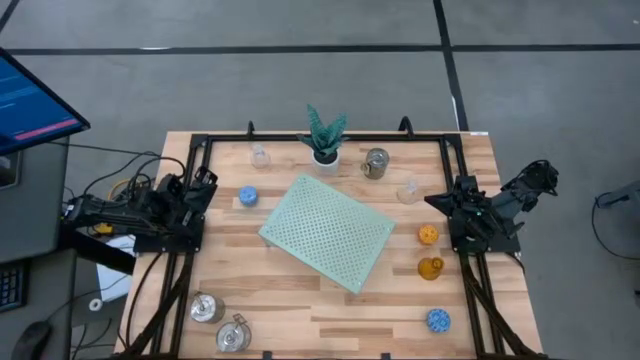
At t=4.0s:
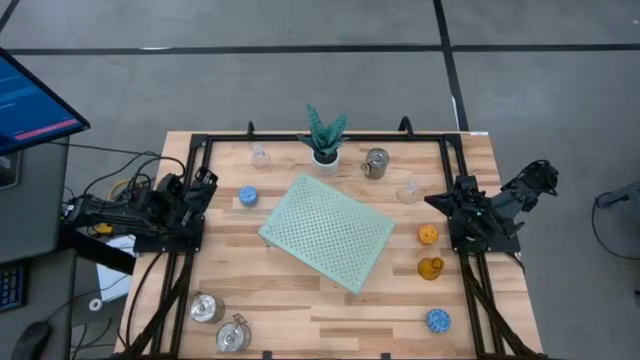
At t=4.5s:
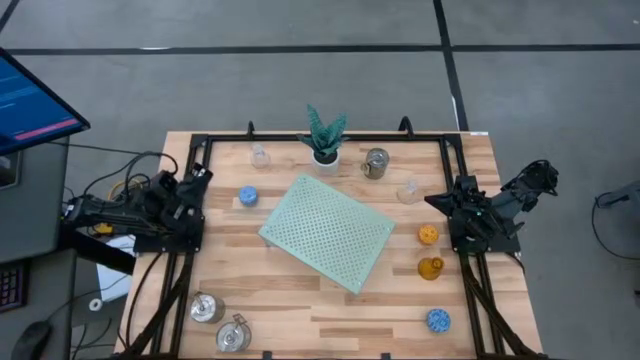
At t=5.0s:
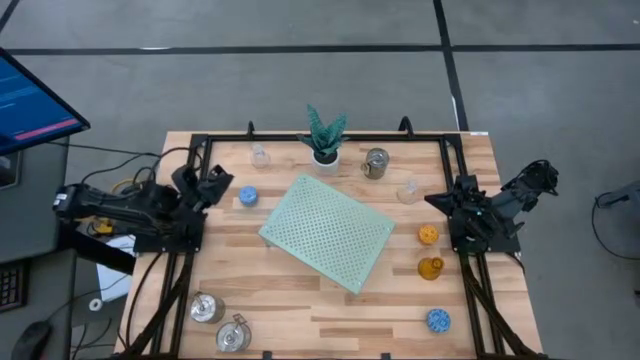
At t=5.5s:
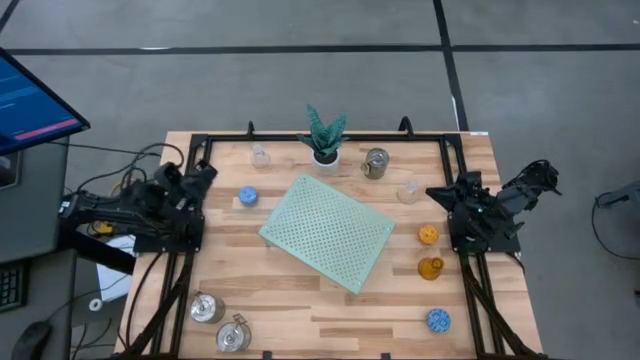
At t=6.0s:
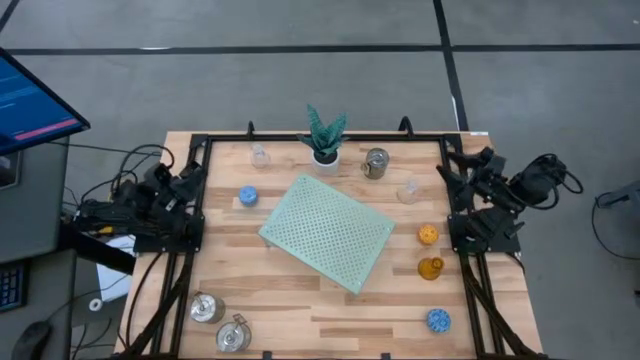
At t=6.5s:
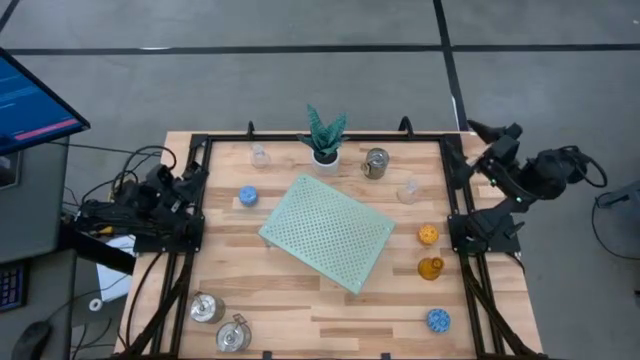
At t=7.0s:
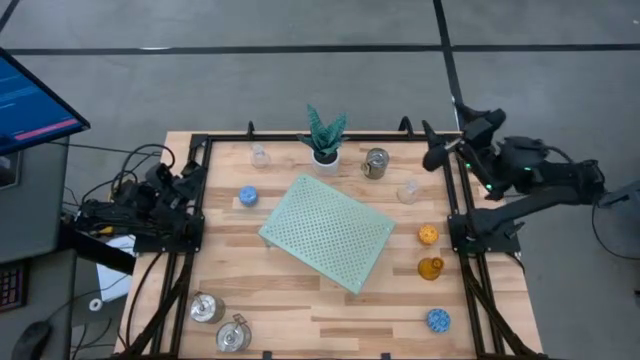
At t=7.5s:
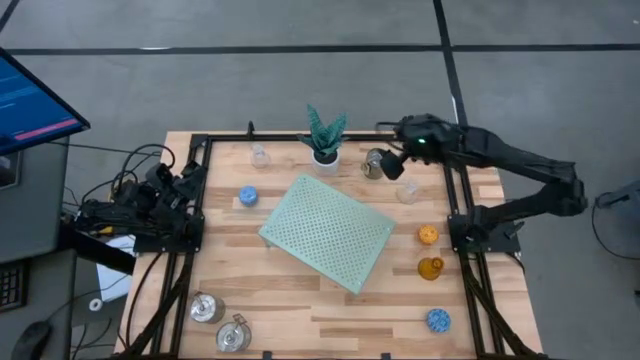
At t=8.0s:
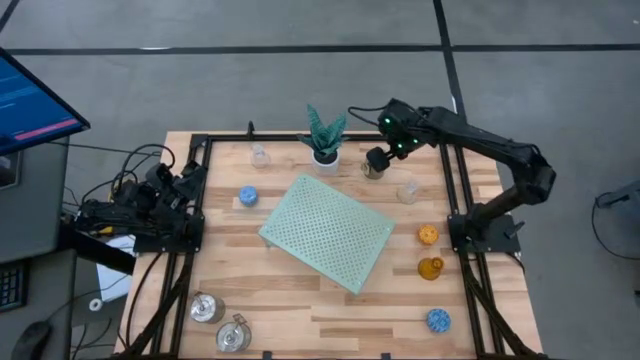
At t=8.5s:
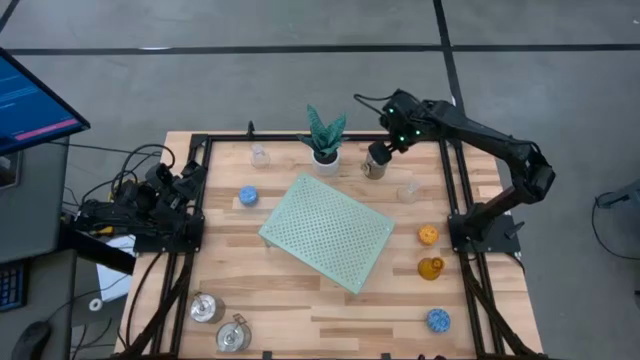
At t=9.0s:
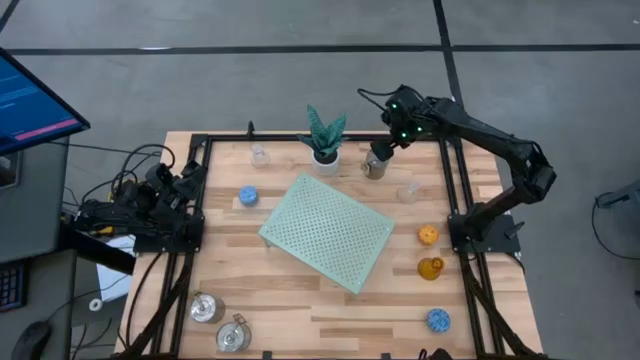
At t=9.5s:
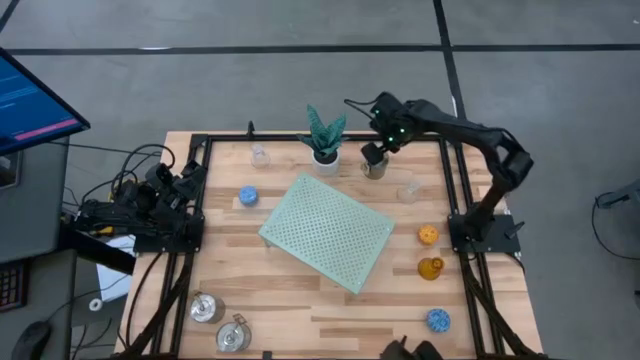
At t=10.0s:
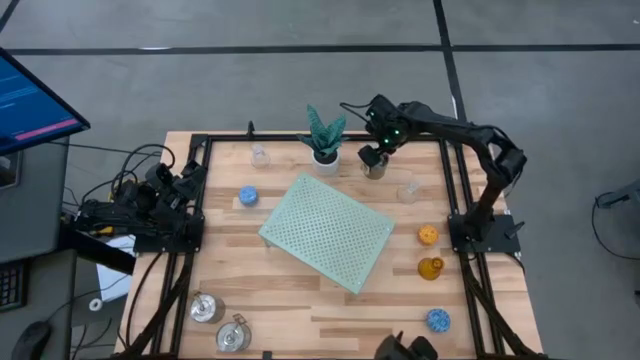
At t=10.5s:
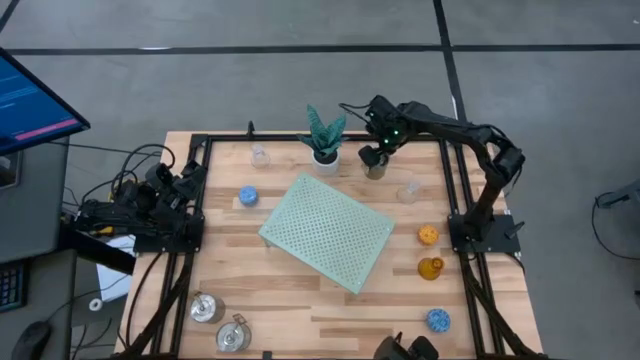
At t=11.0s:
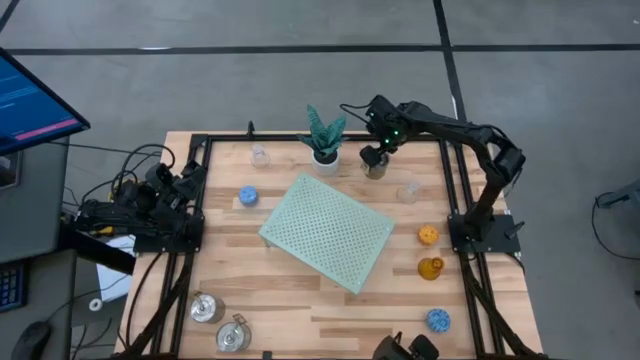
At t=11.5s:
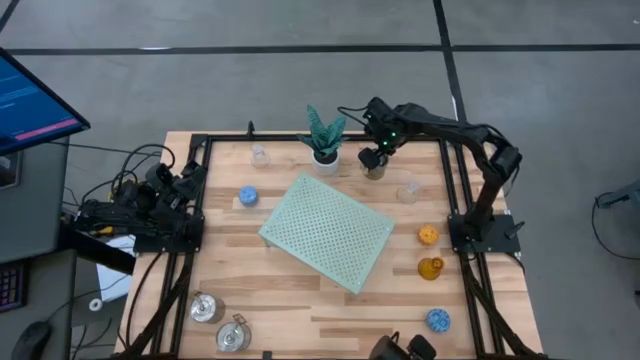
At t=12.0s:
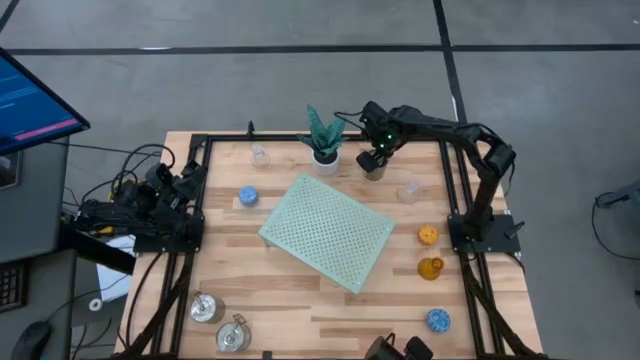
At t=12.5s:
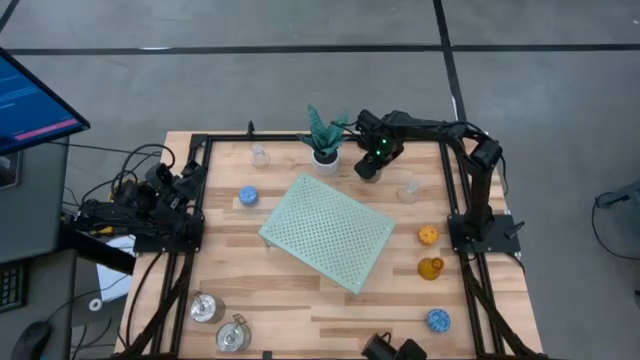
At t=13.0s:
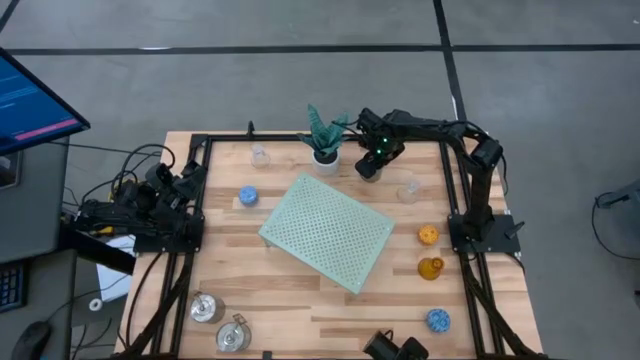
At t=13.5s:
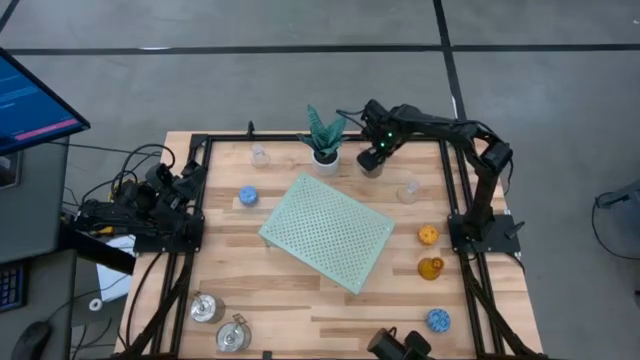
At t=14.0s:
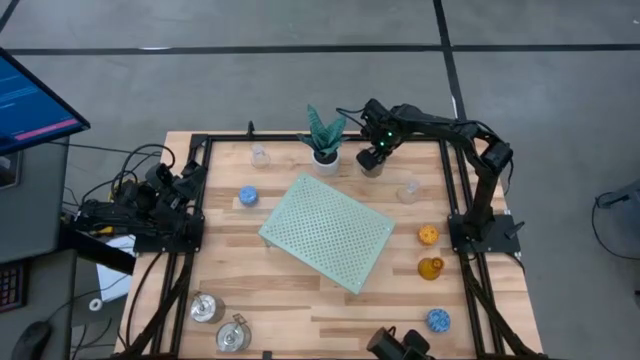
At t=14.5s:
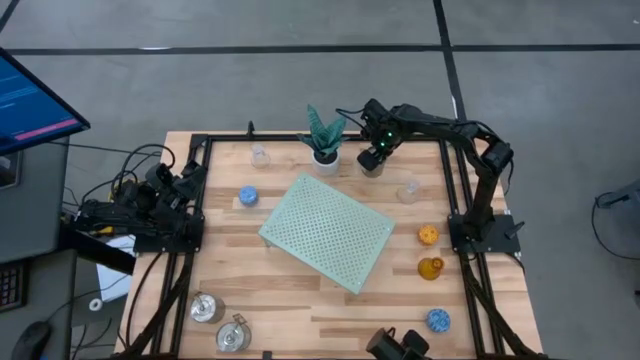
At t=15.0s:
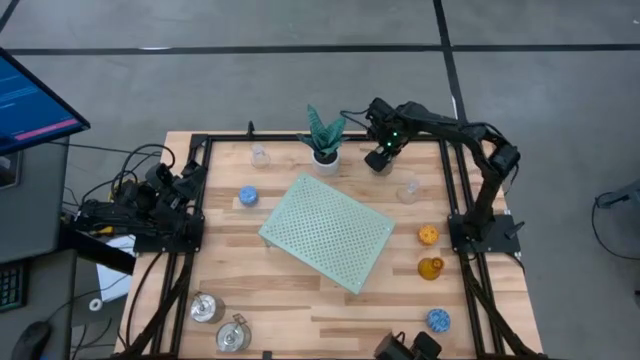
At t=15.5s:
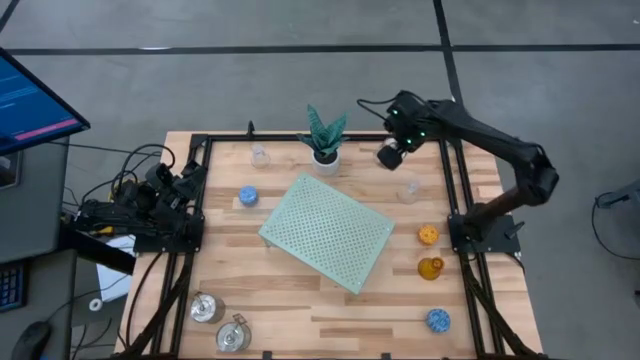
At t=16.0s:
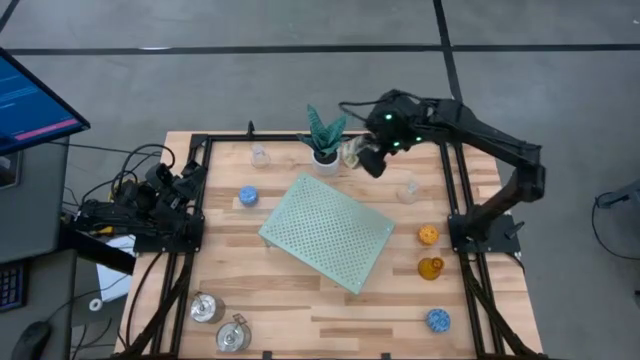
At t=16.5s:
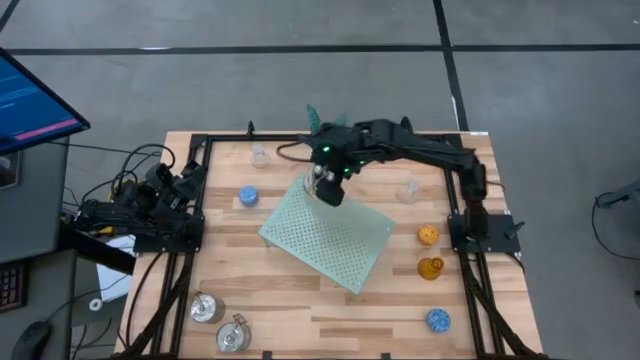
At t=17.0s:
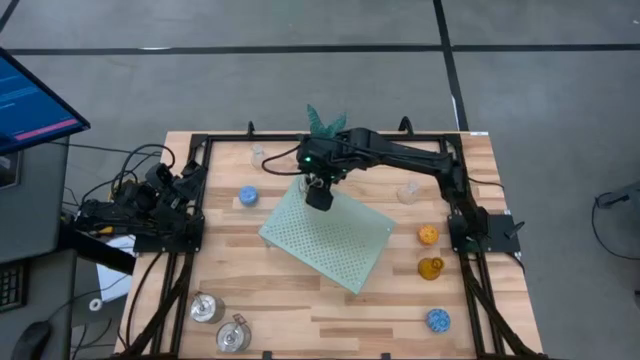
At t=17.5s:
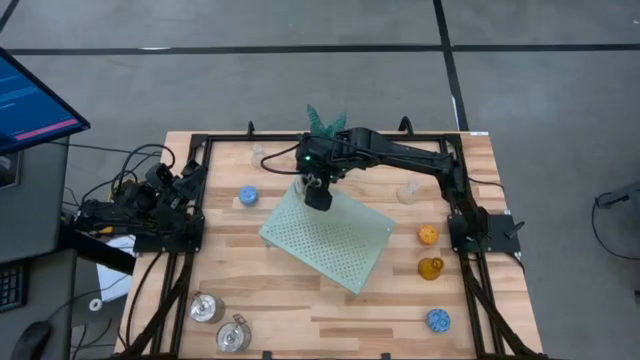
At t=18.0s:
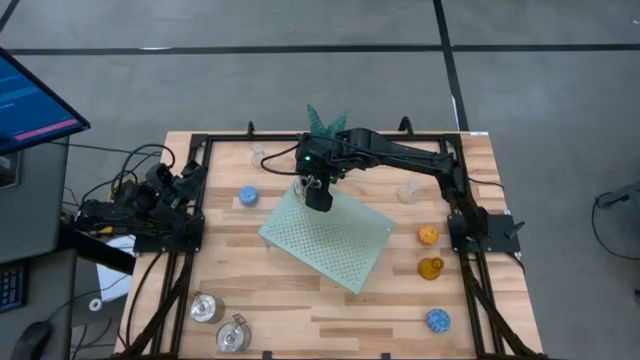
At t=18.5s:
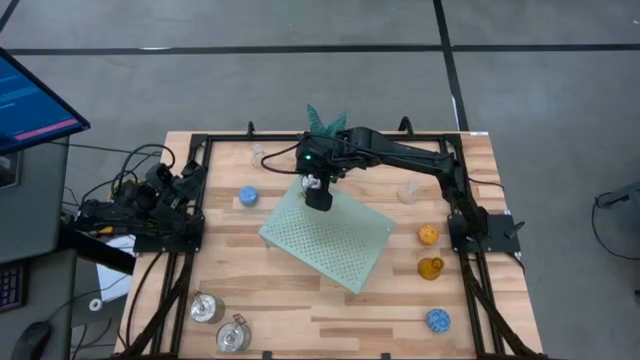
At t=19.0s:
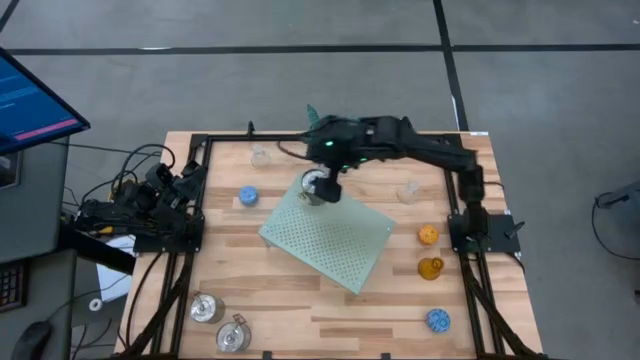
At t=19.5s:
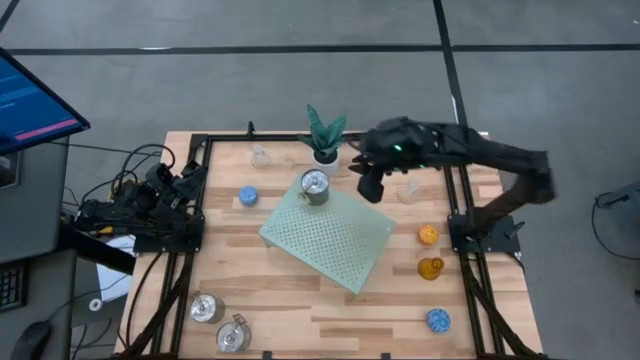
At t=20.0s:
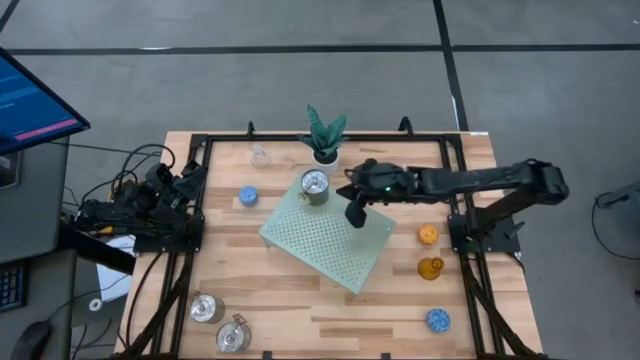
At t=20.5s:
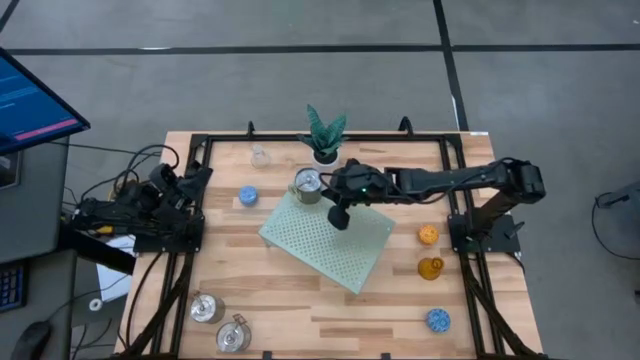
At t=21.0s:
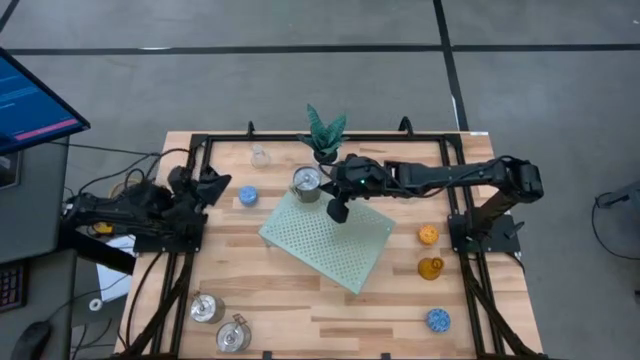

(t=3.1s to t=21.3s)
Task: Pick & Place candle stick holders
Put the top silver scented candle on the shelf

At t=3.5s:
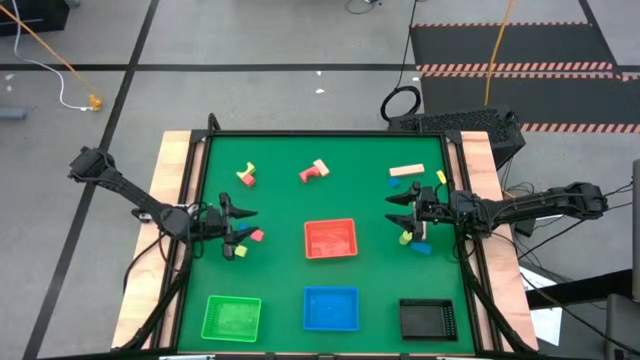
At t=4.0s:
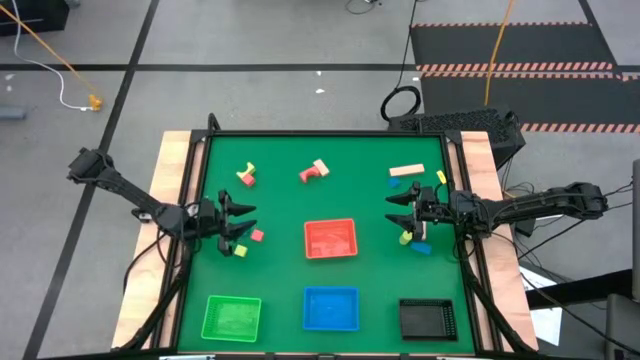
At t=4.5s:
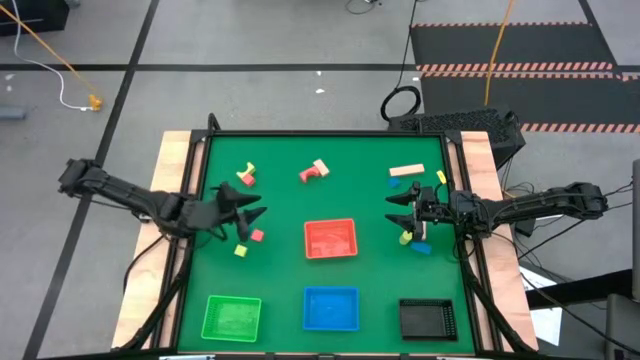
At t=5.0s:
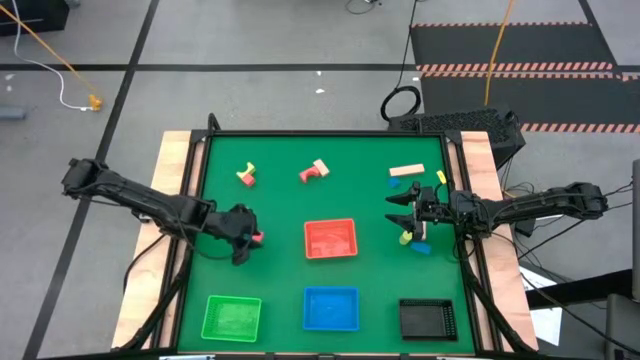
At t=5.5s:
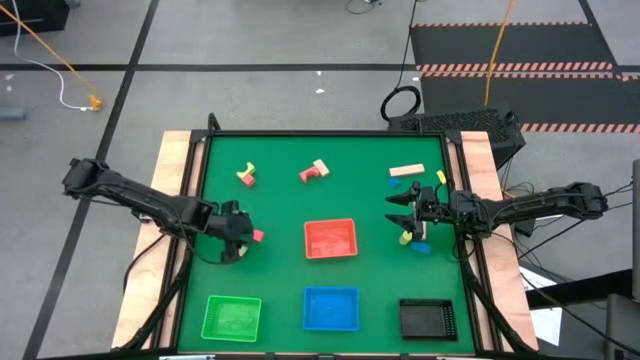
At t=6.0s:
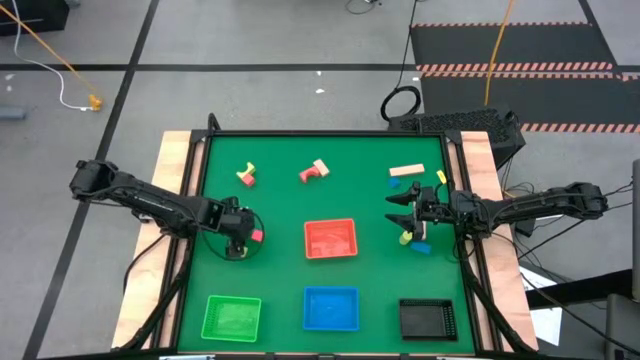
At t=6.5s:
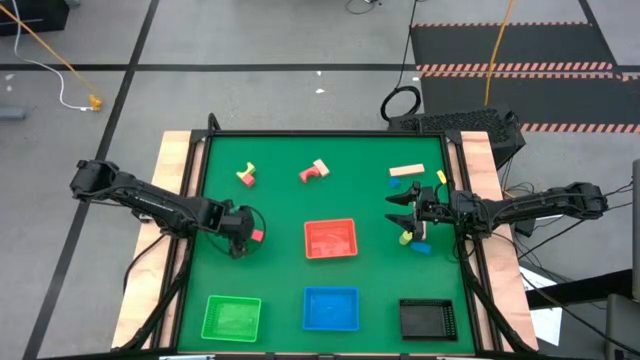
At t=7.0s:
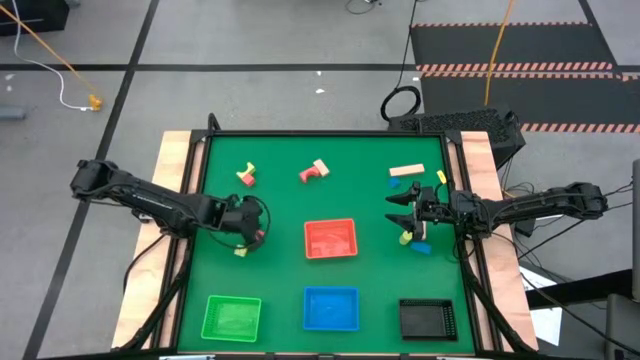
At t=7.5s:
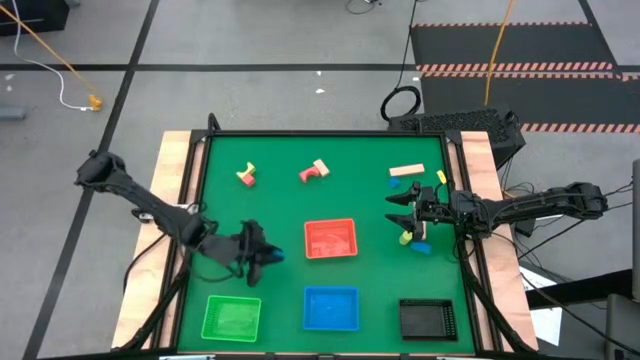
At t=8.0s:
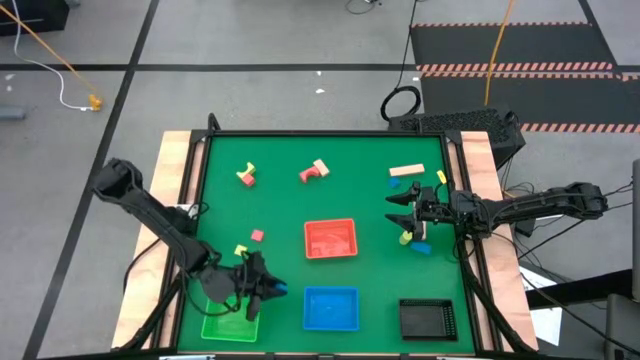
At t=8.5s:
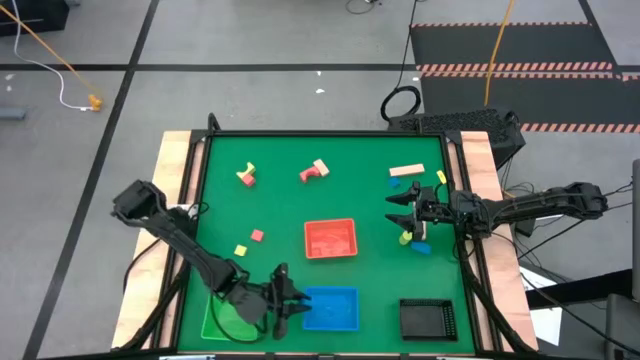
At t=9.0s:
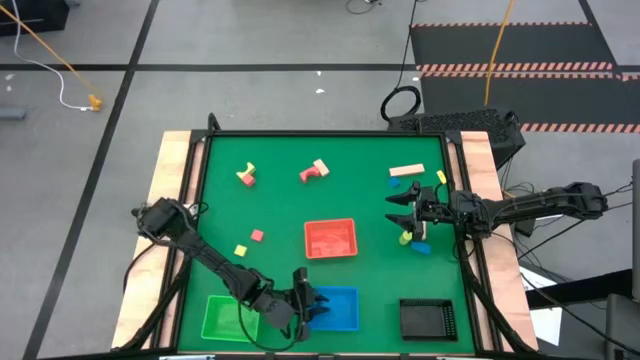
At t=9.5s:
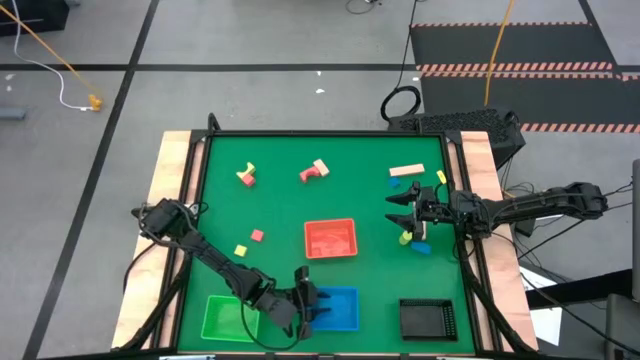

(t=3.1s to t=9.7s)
Task: Sort & place blocks by color
Put the bottom left blue block into the blue bin
